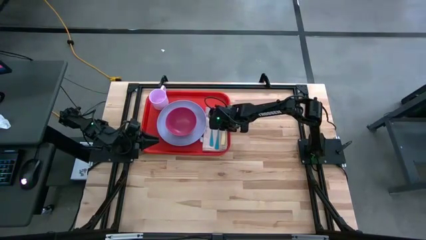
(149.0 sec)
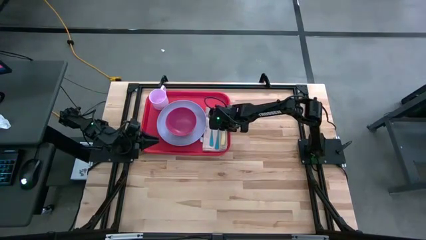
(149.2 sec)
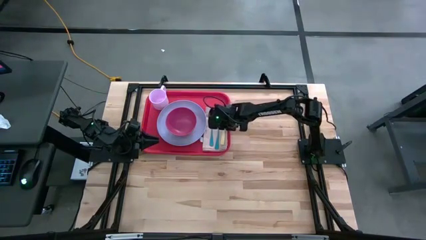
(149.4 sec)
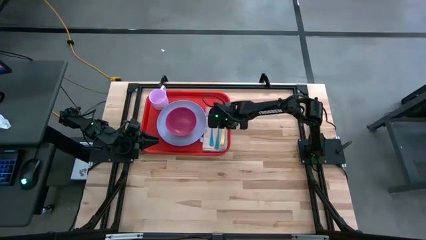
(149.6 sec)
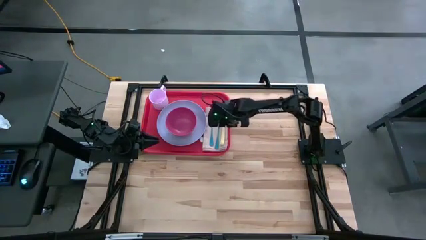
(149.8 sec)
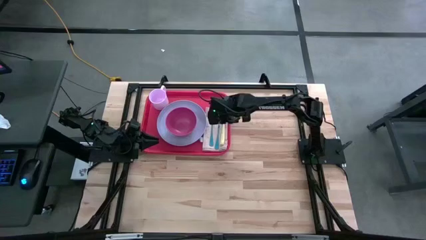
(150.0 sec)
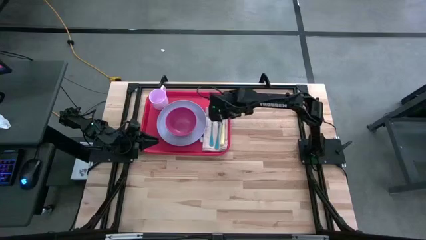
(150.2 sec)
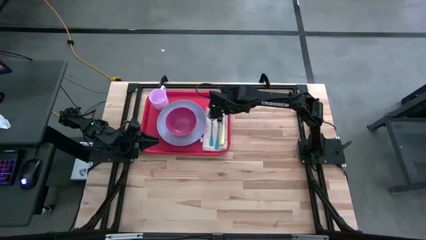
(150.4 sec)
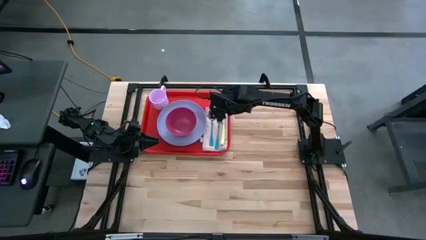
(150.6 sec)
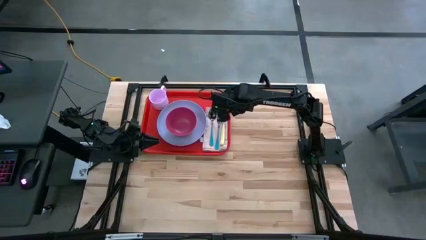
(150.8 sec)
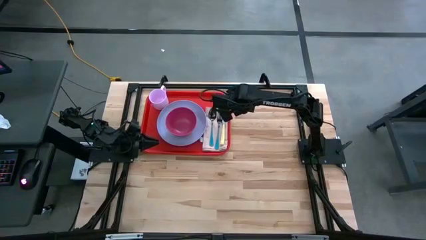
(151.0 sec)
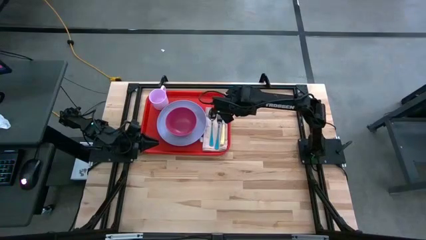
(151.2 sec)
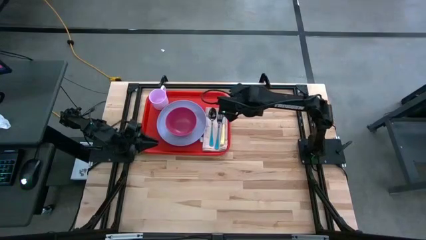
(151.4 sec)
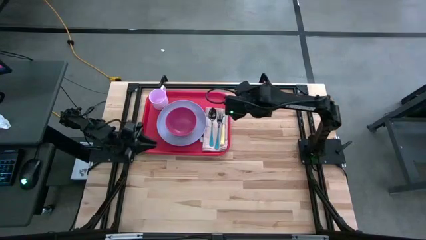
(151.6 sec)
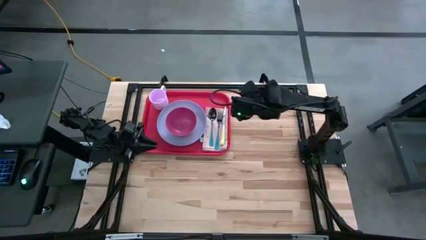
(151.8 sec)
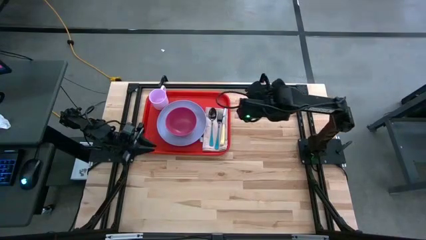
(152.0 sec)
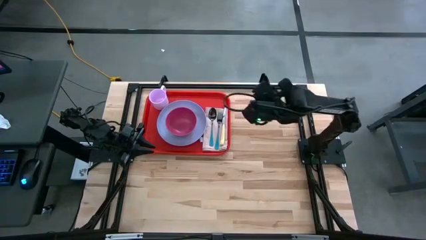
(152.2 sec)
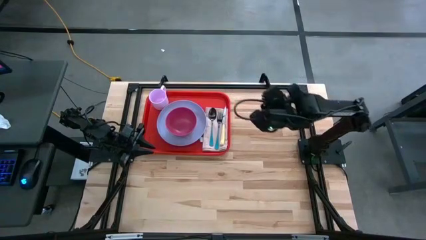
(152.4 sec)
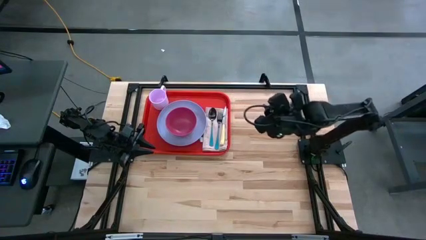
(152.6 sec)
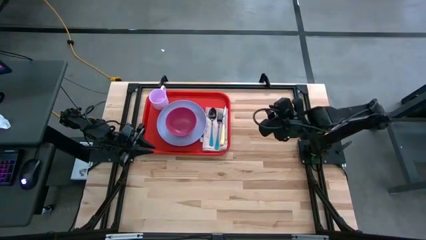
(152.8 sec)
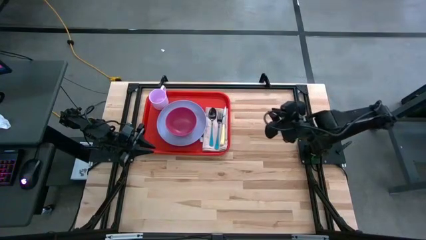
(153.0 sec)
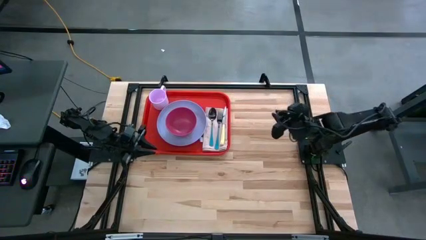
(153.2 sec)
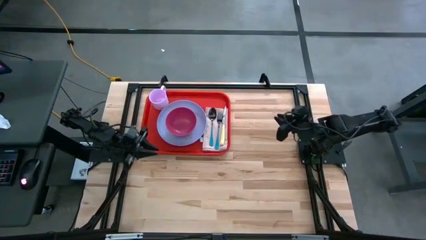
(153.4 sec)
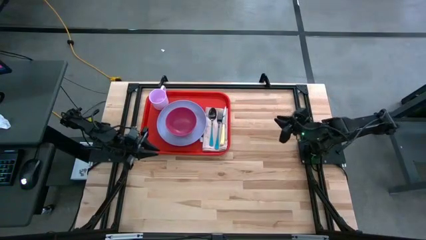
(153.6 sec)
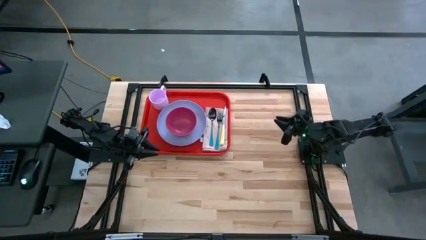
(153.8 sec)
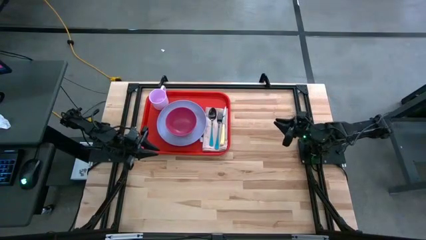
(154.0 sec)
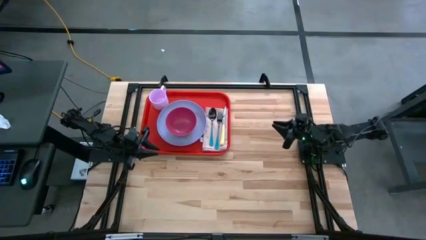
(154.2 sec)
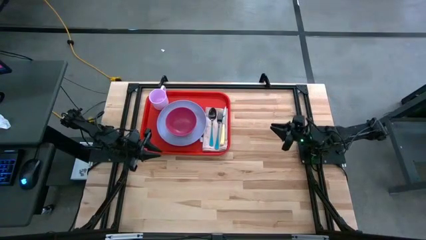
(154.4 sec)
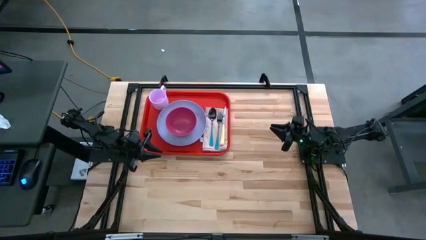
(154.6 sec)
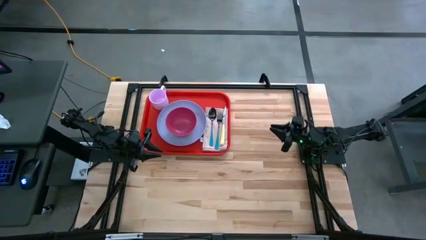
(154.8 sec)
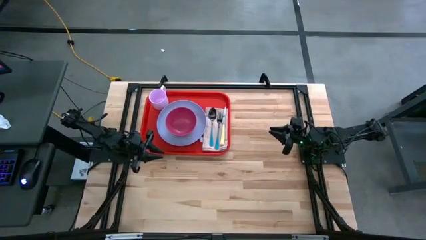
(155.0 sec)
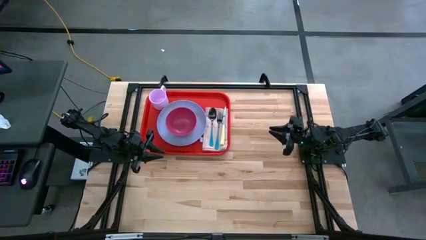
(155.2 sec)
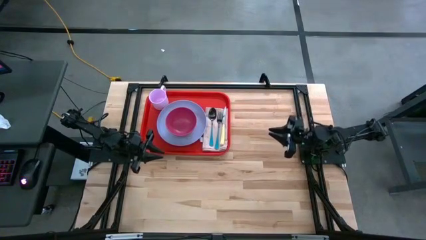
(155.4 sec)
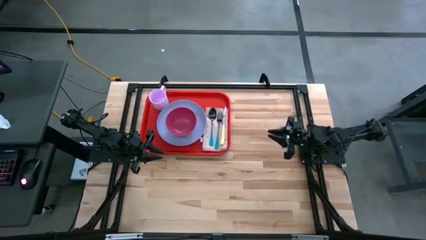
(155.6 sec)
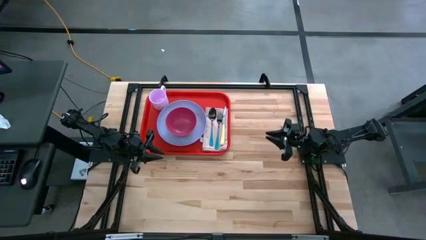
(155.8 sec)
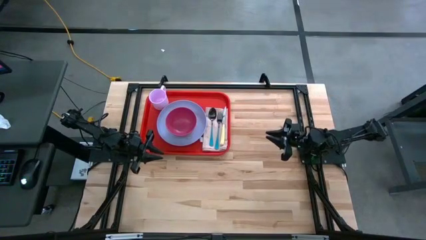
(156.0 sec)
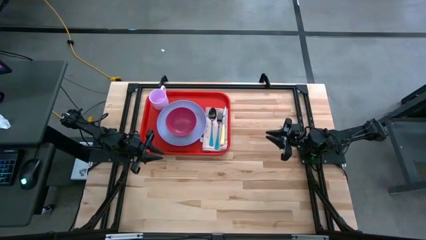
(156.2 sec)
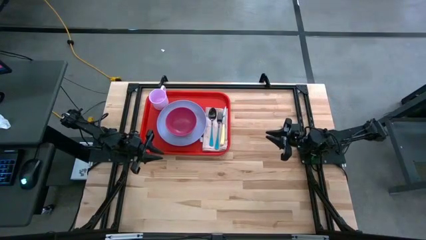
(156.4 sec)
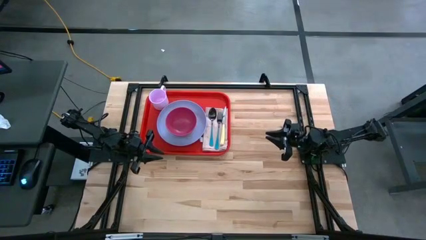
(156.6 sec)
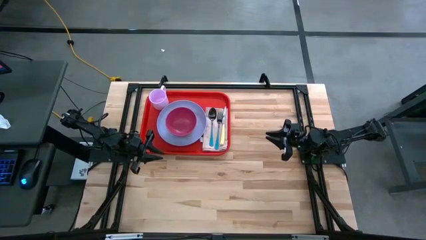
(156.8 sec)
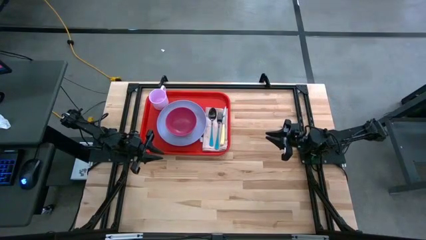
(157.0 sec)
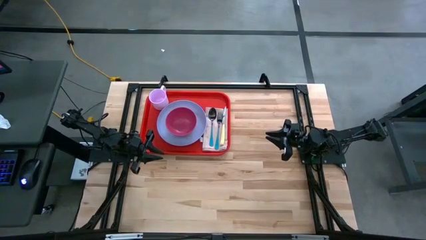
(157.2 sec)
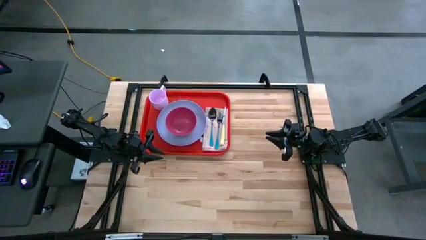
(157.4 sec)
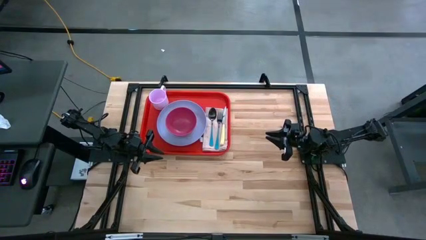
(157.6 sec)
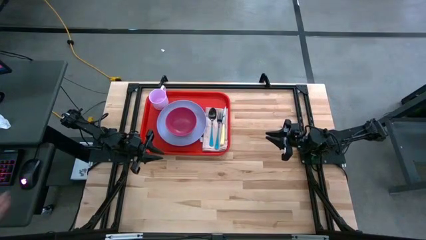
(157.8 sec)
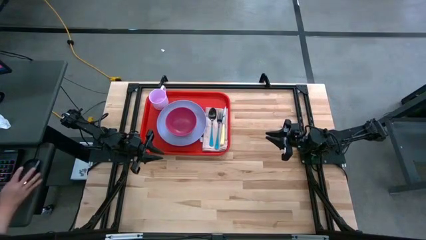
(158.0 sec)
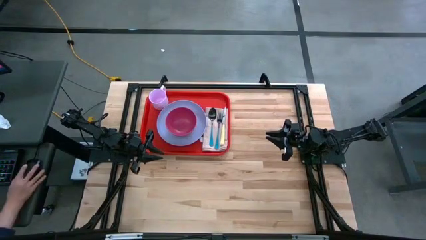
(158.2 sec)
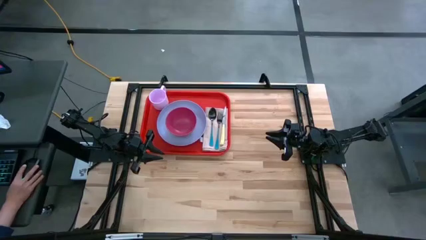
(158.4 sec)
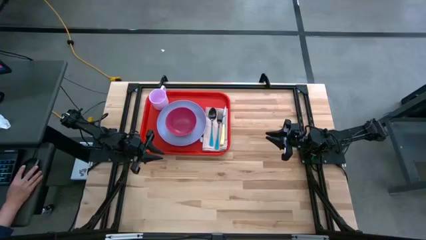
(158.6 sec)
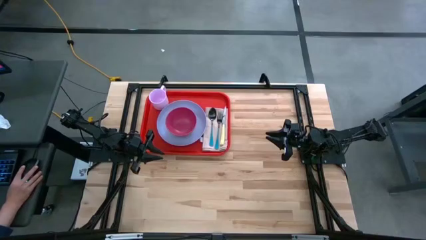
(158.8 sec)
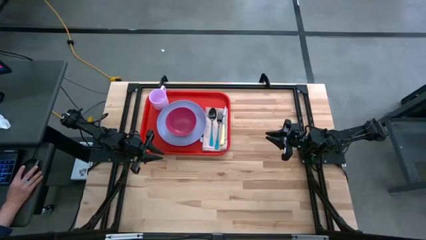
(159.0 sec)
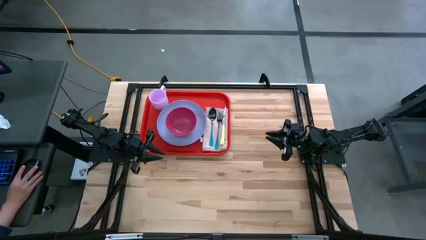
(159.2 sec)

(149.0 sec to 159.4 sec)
Task: Set up tray
Return to Home Position

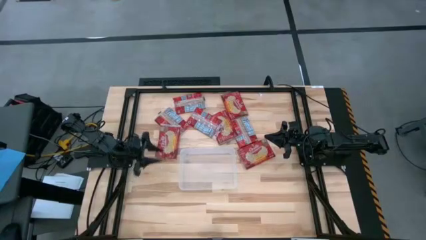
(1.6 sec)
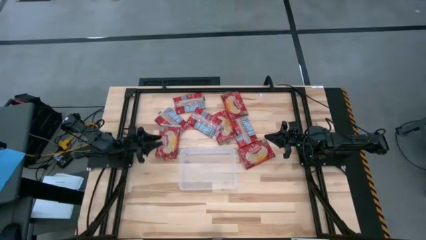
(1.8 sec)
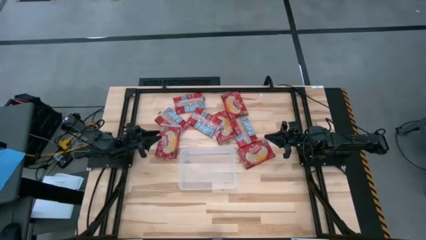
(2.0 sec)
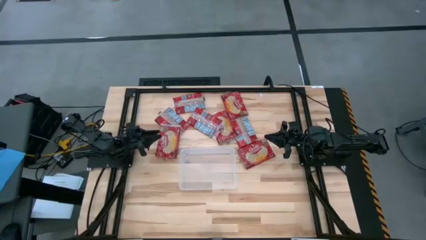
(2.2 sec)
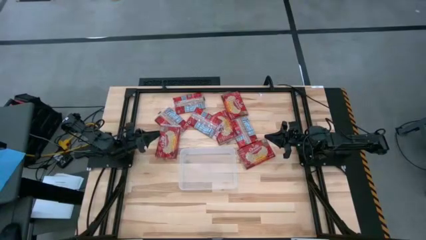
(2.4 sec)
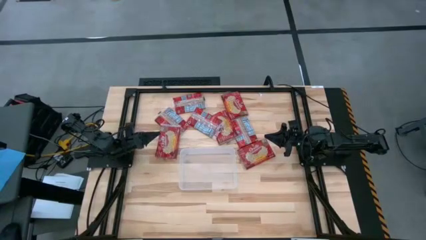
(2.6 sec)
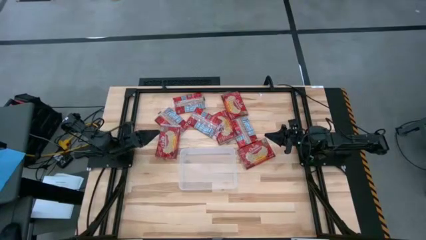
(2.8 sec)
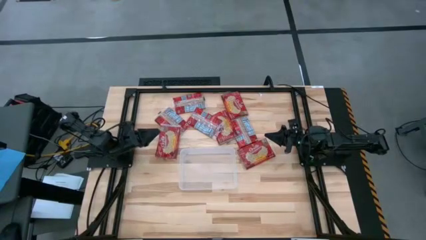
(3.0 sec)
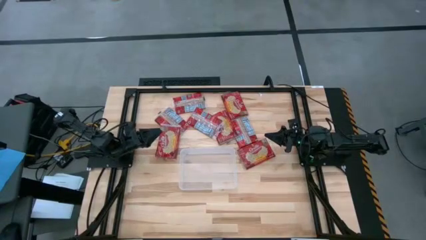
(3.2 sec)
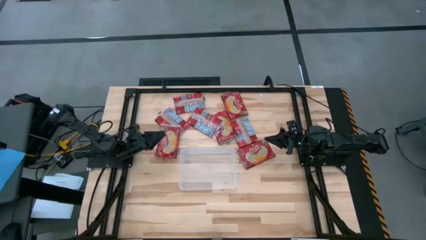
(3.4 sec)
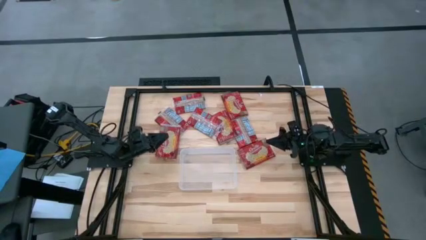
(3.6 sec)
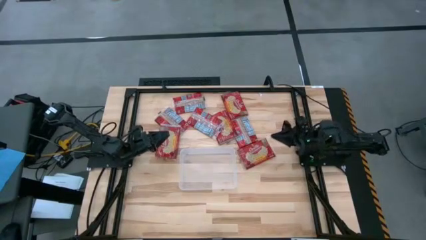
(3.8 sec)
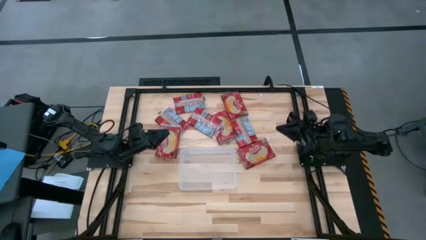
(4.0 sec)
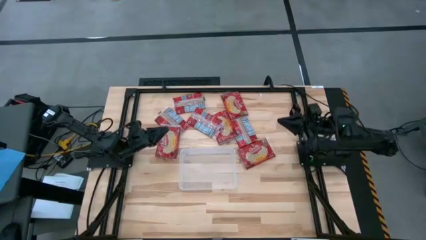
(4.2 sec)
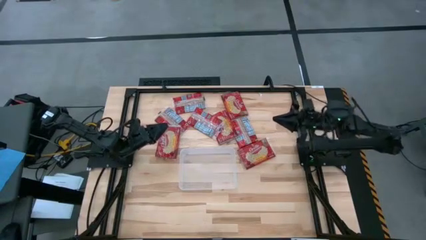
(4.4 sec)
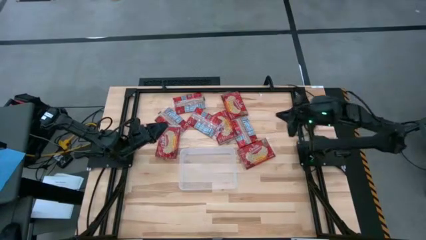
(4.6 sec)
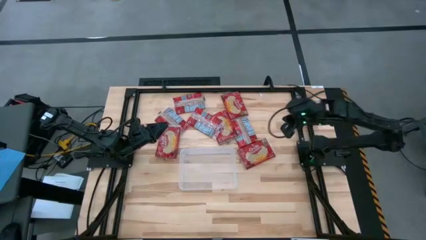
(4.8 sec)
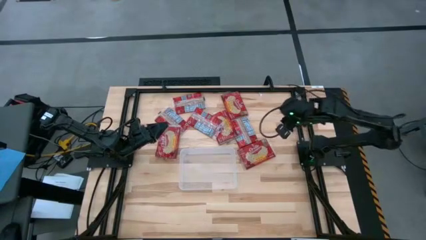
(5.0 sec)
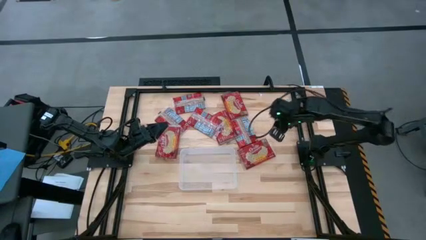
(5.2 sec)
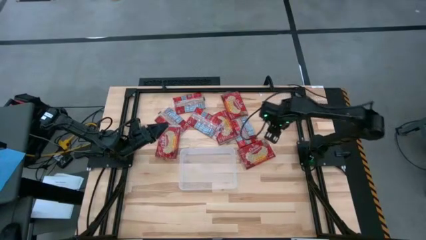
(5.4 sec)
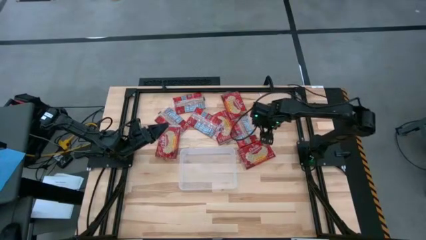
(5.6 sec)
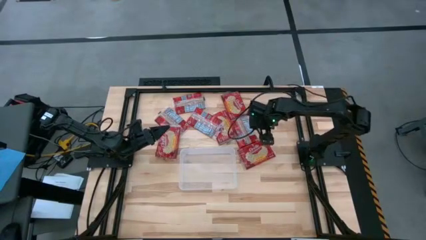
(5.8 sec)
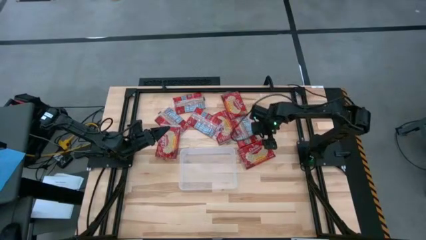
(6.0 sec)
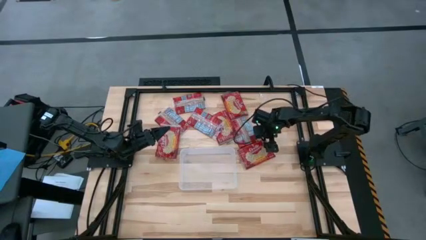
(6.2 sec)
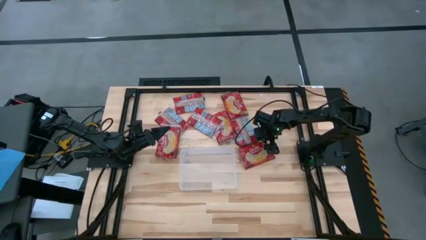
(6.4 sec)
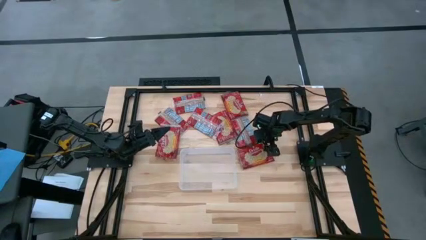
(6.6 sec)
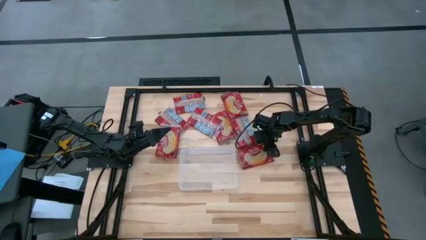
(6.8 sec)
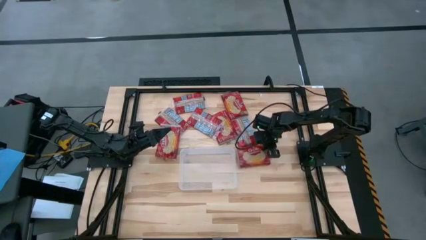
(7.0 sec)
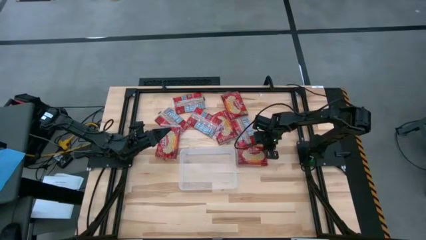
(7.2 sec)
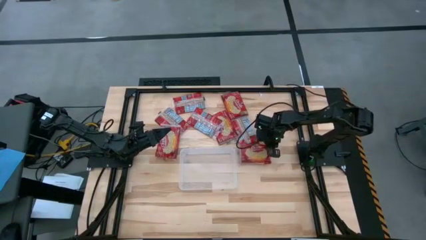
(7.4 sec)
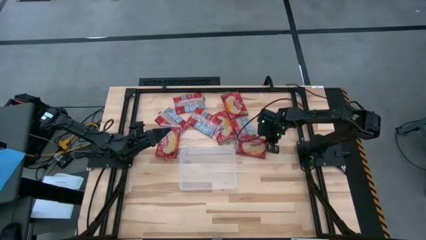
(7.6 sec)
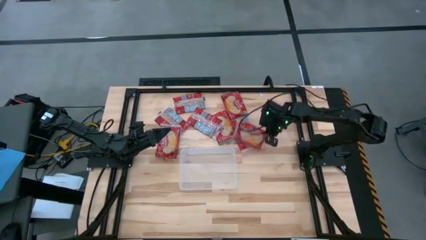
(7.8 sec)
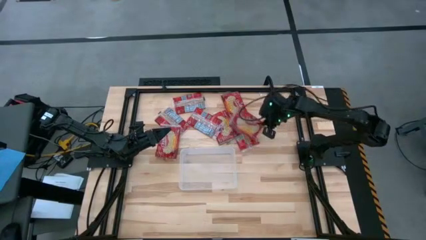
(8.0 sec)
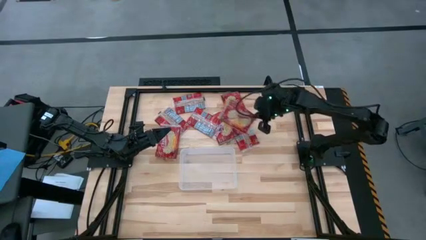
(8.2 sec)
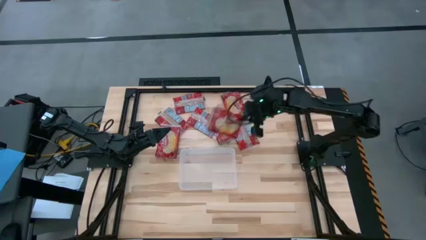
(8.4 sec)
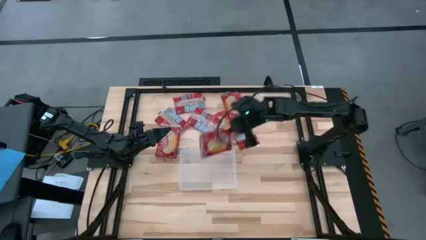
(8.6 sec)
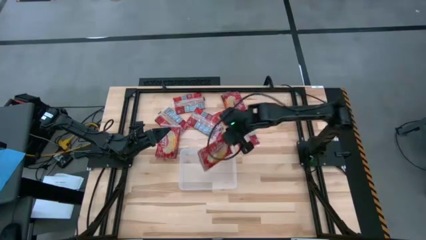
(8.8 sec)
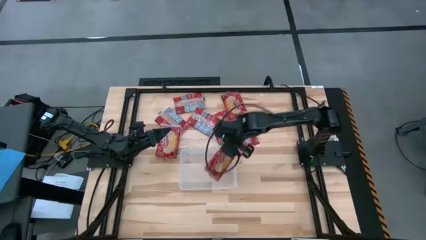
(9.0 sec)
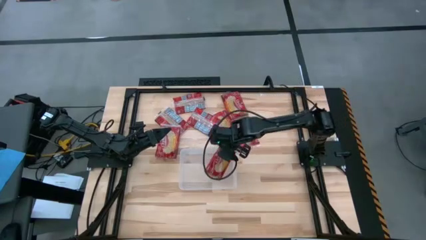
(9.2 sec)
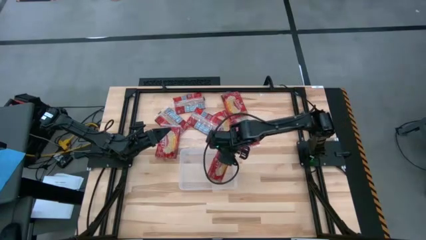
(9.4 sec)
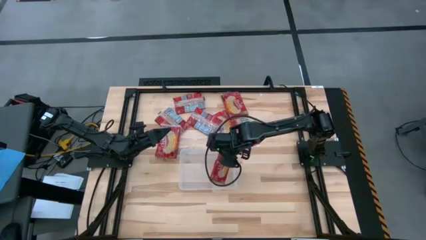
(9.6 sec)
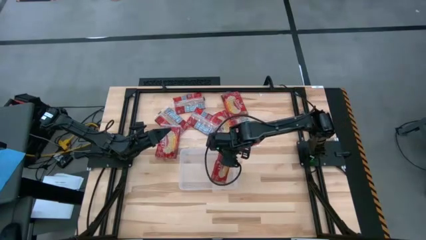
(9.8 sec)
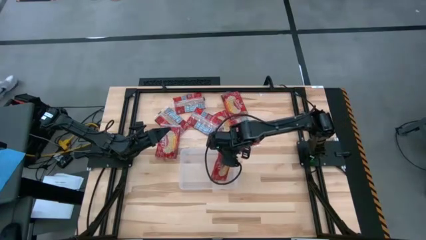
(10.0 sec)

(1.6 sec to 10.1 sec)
Task: Sort popcorn bags into baskets
Put the red popcorn bag into the transparent bin
